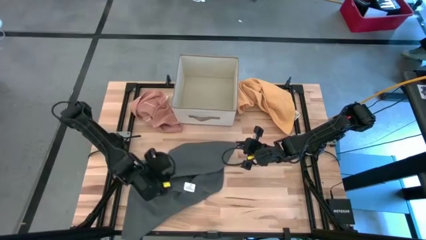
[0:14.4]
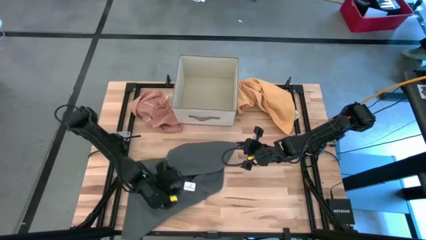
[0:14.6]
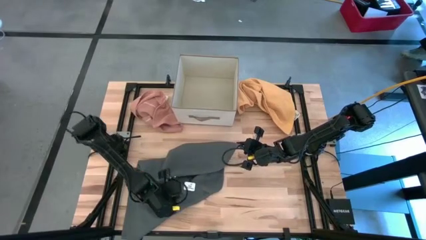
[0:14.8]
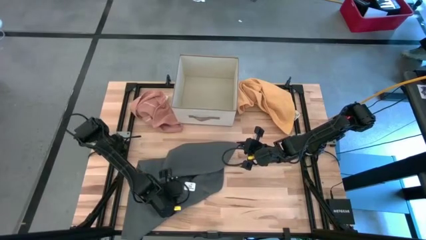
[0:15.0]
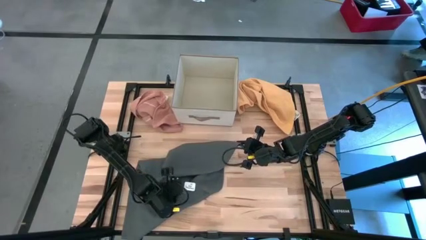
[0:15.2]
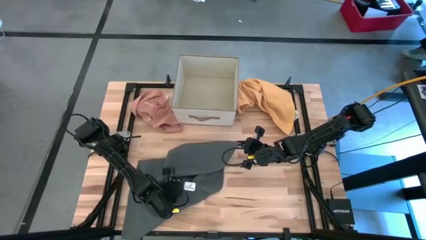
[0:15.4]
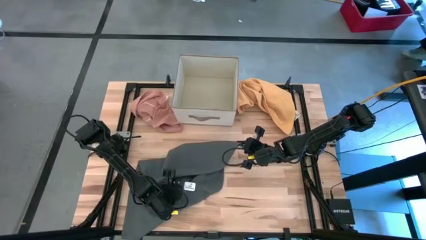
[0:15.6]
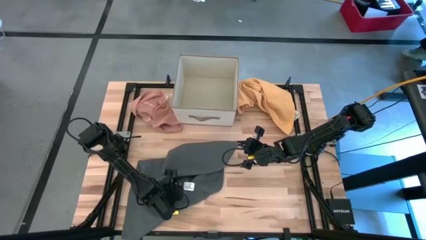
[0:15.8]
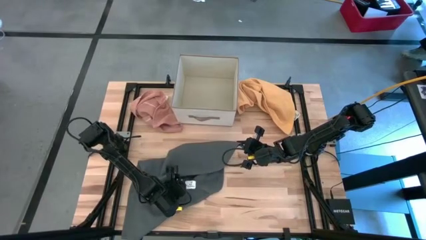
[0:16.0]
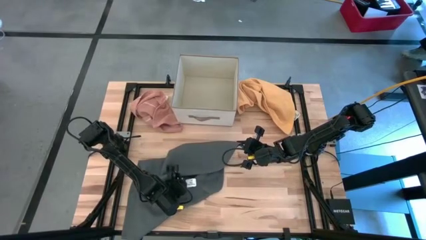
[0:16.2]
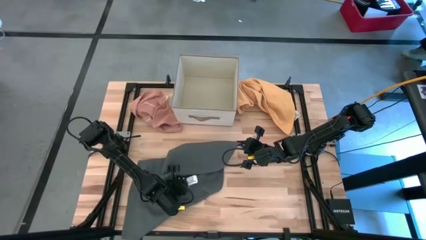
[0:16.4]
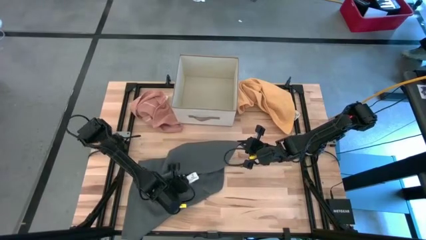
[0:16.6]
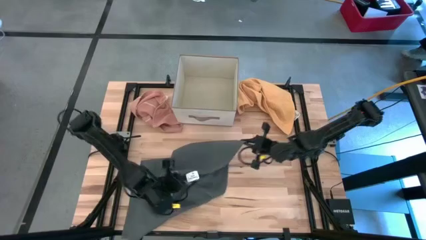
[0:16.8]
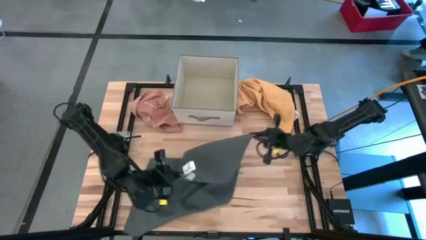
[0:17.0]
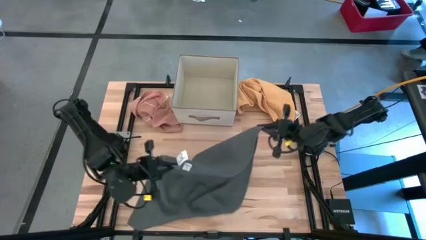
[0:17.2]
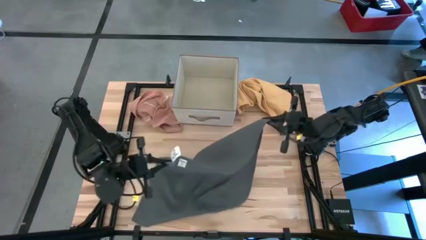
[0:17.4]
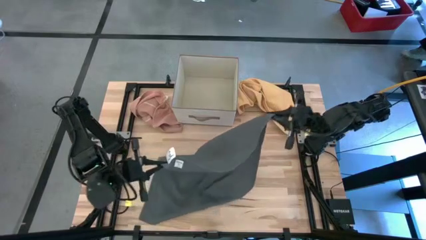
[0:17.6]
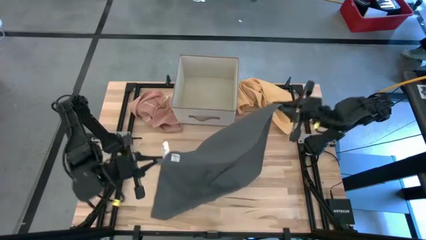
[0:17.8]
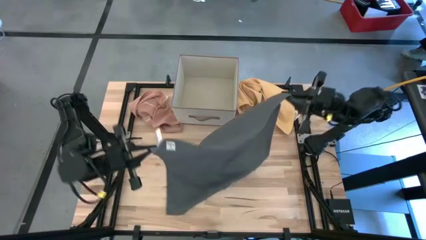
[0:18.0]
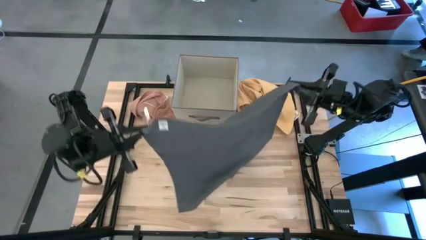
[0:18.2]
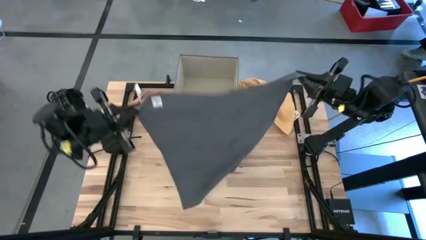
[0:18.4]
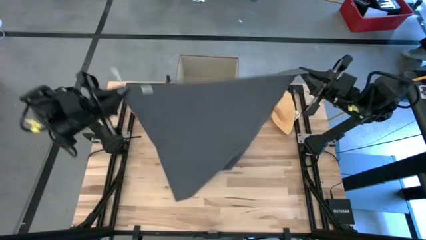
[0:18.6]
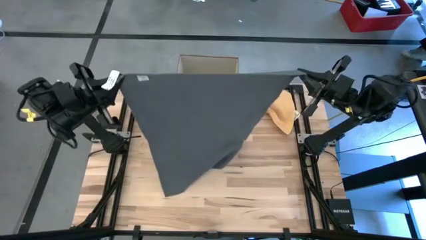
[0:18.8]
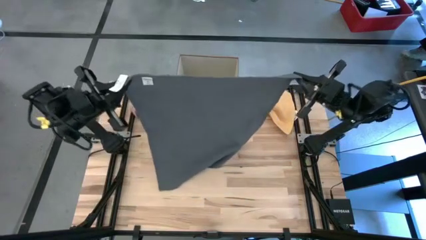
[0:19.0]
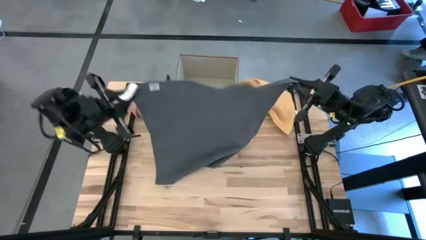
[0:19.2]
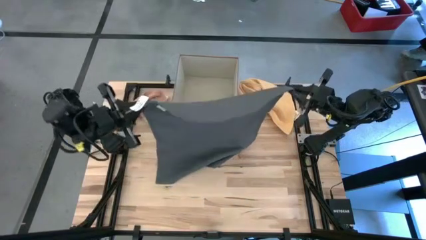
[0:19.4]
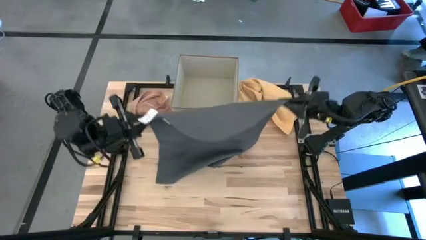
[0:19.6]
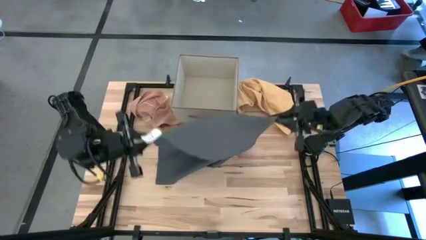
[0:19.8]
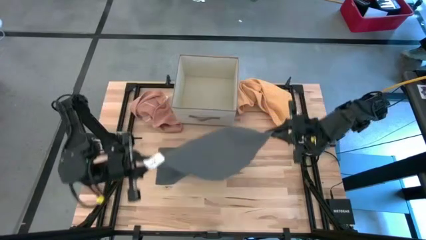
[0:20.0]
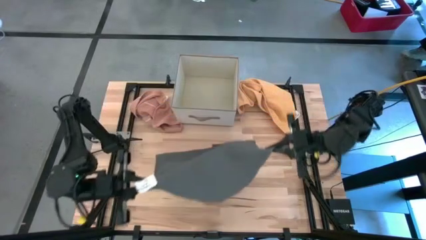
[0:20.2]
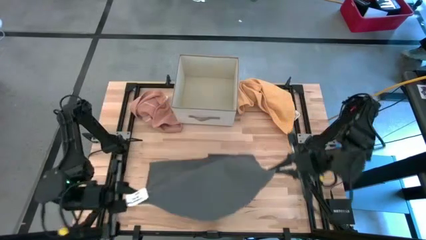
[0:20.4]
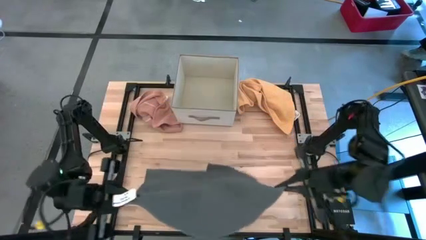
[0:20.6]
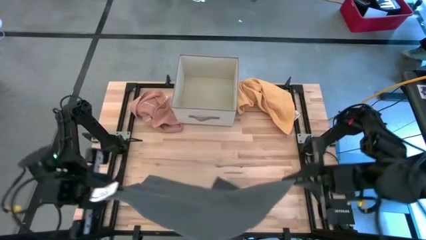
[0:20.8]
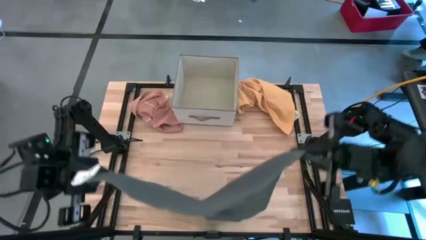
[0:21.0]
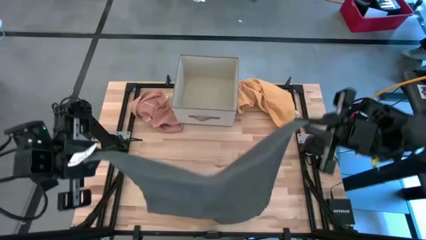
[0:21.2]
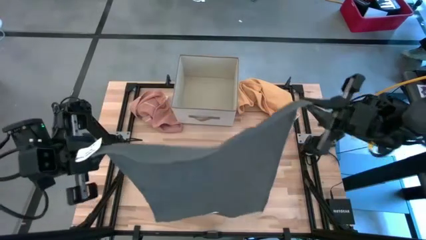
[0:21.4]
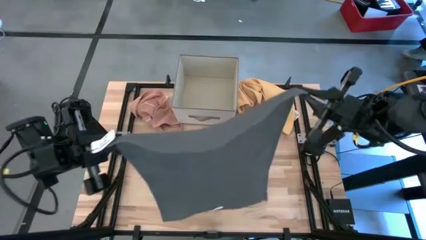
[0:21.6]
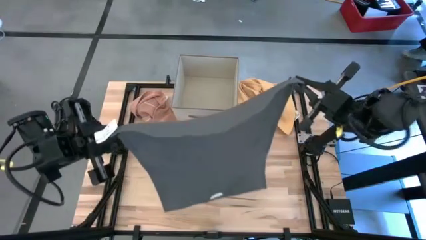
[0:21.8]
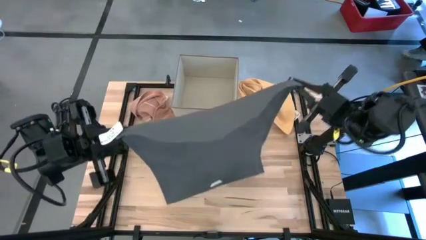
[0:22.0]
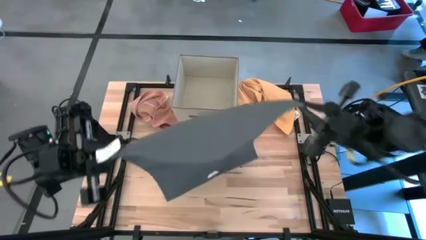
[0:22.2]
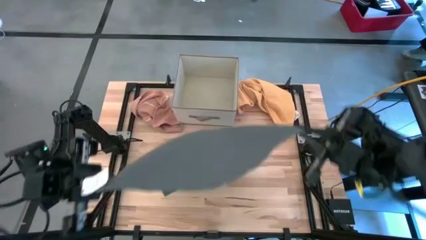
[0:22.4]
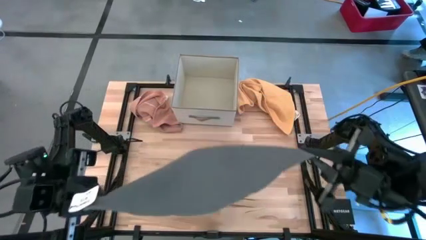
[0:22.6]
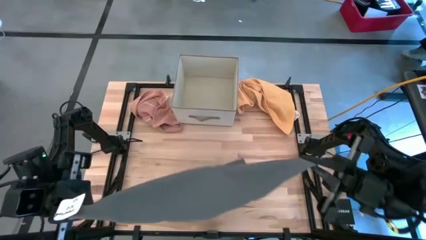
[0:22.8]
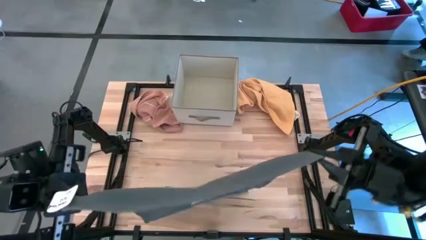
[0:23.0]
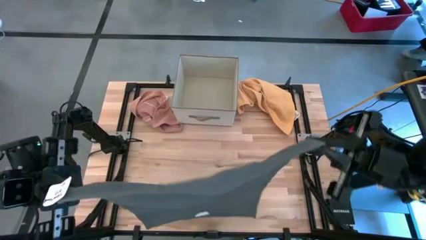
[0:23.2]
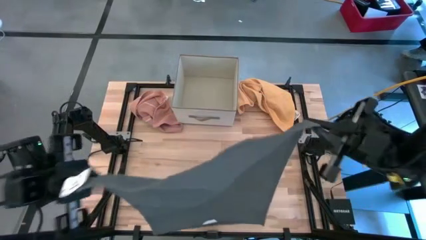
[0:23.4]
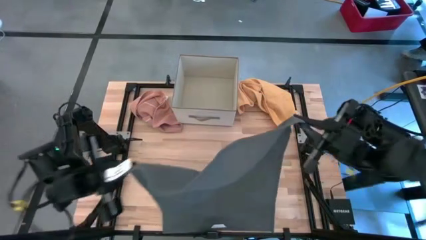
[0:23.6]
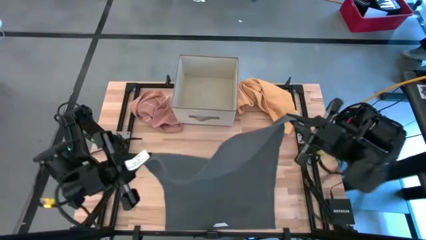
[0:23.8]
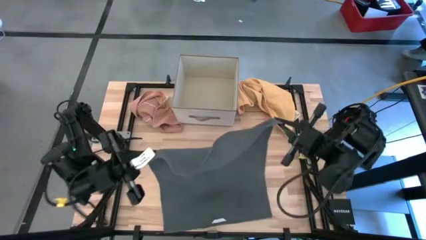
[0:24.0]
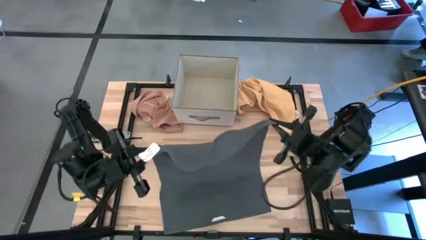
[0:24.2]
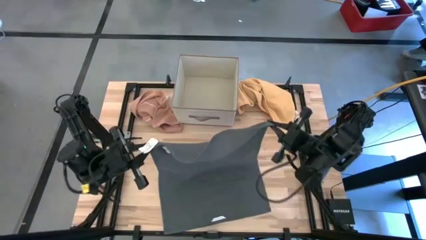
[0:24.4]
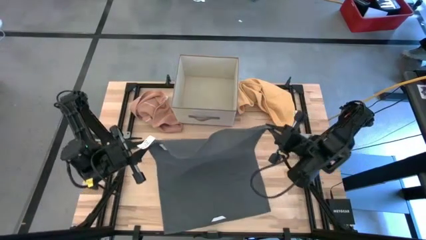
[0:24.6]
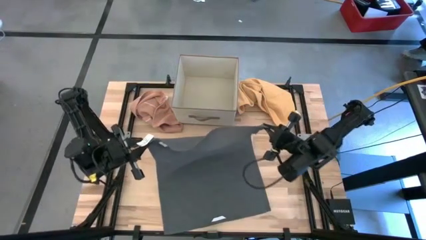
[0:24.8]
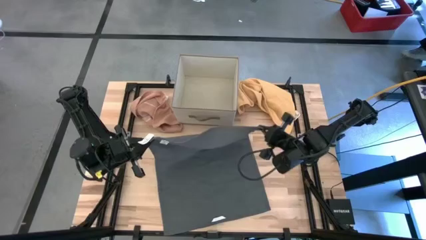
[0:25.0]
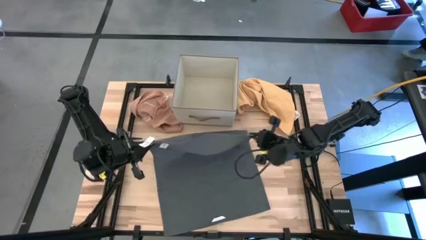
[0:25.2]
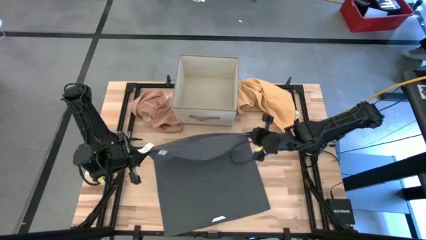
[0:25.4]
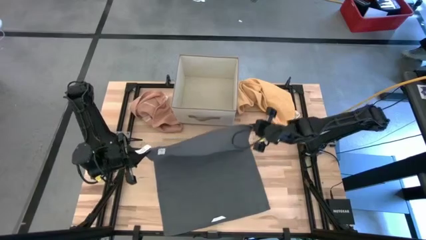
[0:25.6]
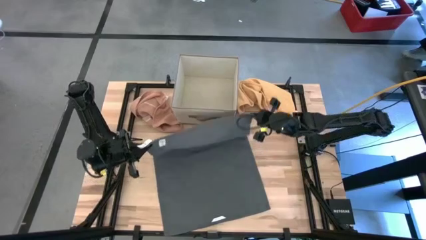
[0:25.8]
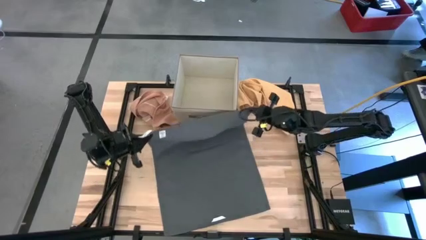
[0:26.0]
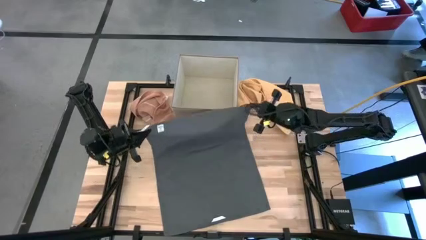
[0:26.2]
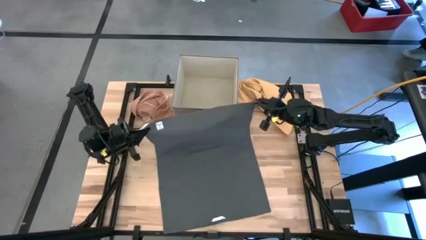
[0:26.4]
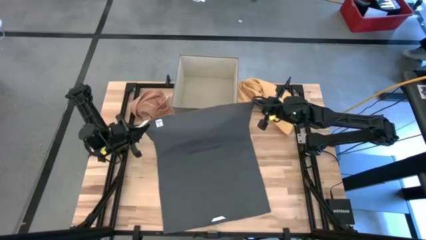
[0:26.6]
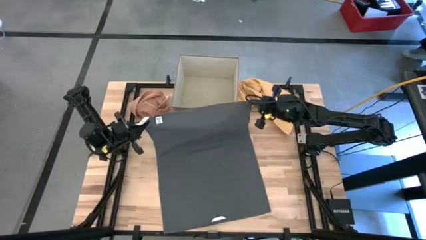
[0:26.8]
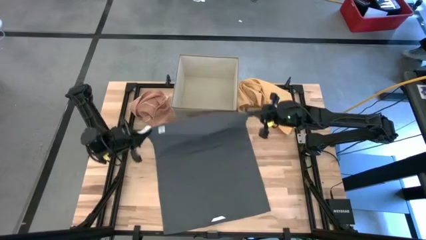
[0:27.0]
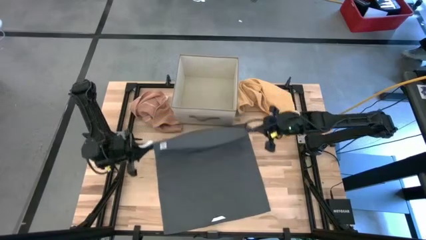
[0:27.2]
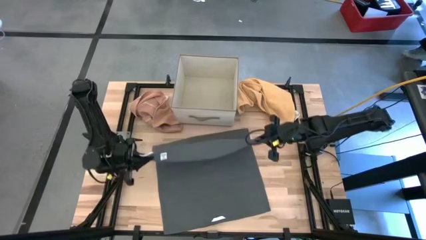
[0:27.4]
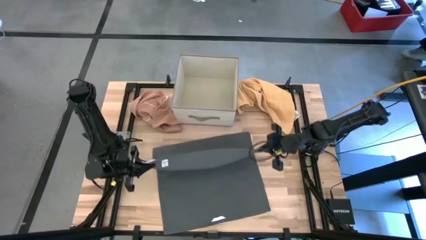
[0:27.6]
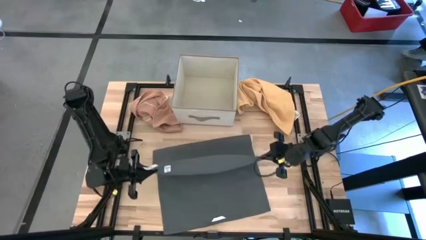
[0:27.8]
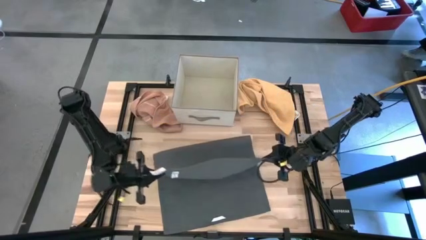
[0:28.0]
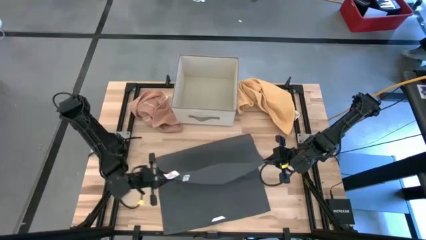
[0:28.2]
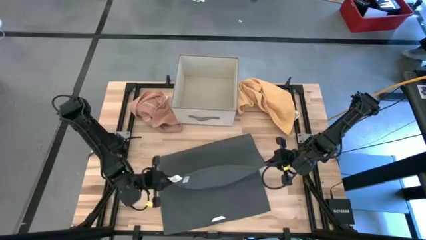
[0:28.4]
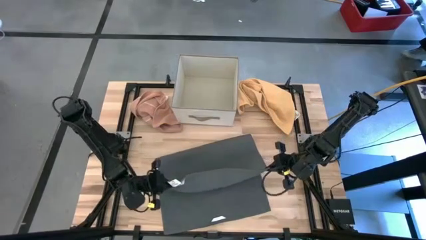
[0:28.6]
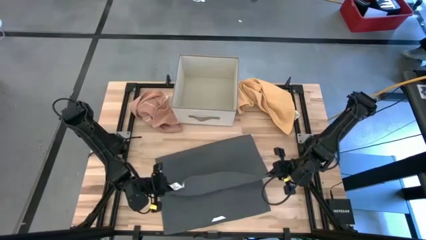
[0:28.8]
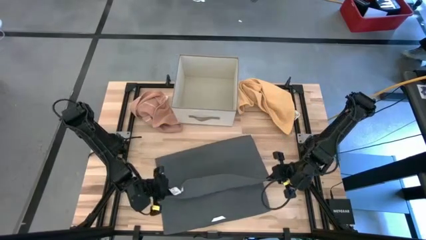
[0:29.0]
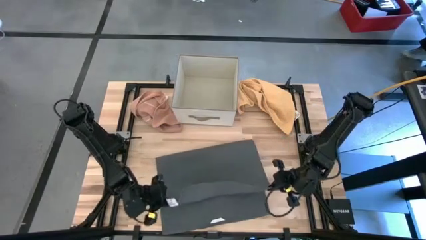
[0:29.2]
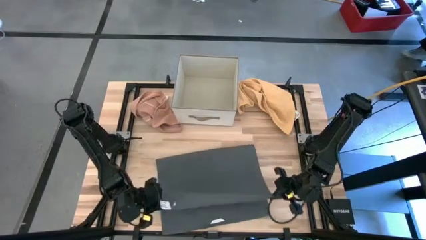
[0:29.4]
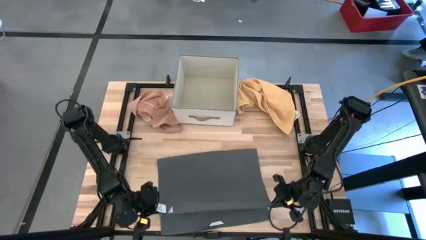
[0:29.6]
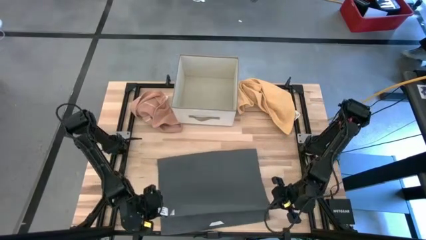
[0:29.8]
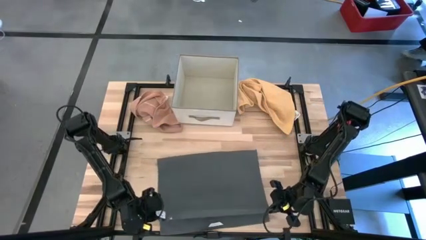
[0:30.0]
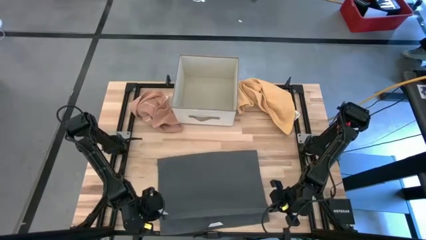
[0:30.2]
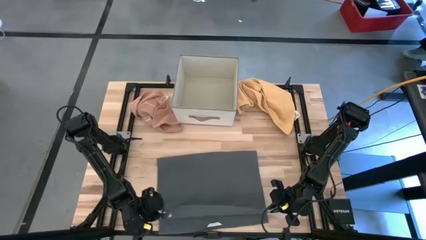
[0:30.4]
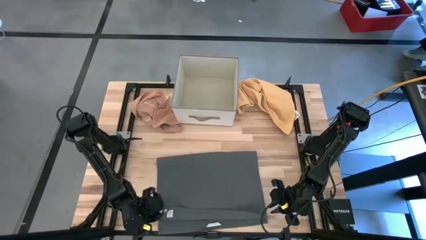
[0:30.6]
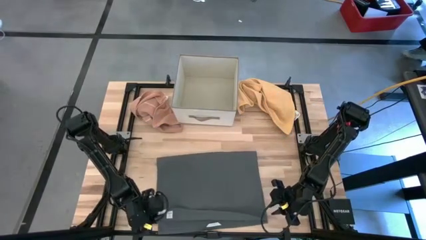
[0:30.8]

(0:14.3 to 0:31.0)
Task: Fold towel
Fold the dark gray towel
